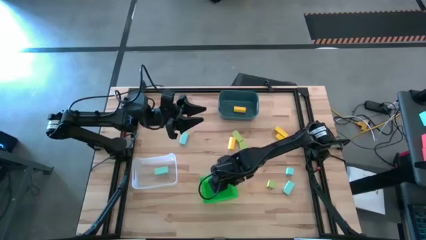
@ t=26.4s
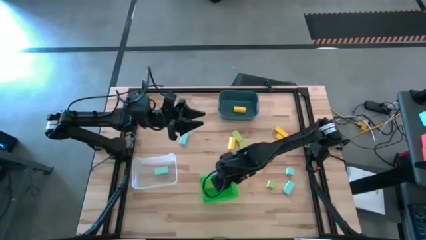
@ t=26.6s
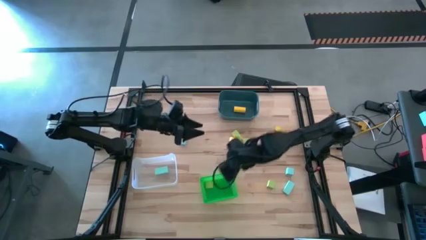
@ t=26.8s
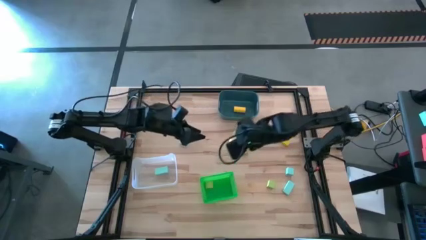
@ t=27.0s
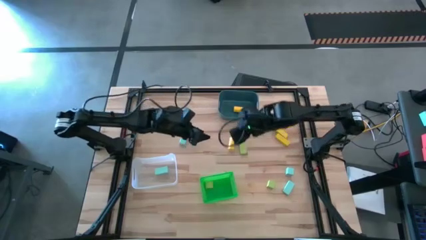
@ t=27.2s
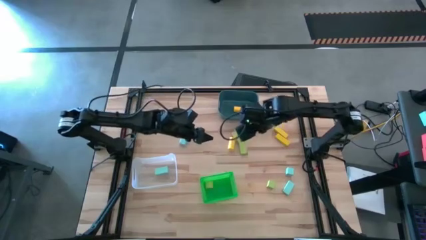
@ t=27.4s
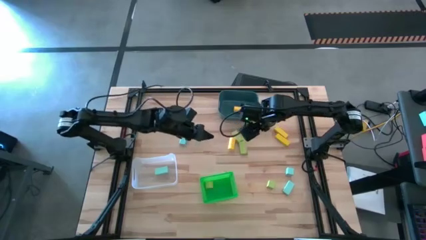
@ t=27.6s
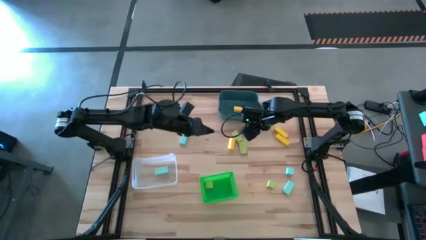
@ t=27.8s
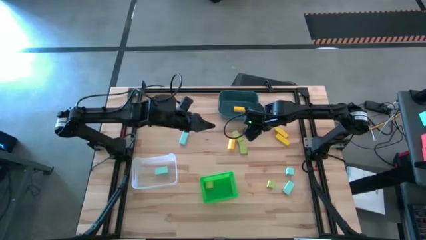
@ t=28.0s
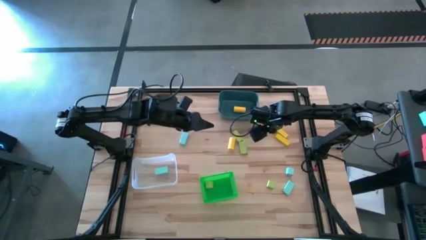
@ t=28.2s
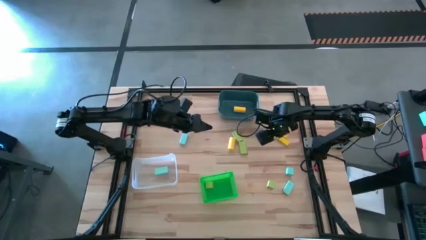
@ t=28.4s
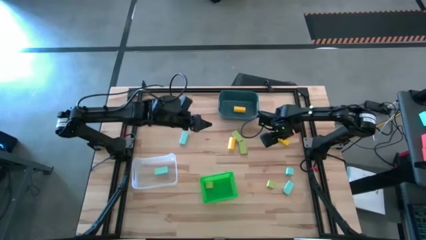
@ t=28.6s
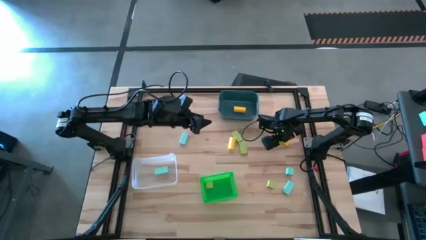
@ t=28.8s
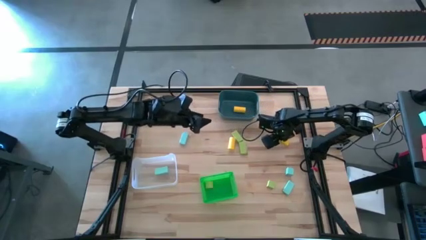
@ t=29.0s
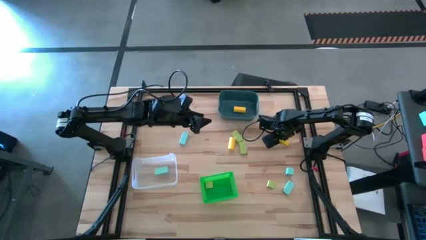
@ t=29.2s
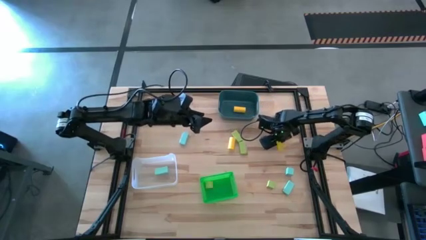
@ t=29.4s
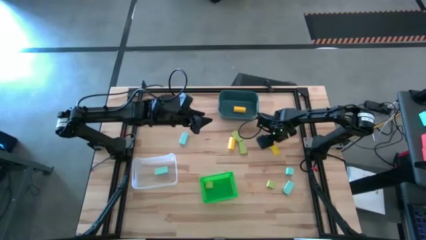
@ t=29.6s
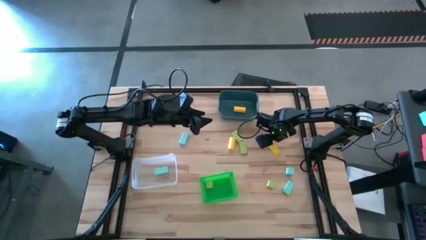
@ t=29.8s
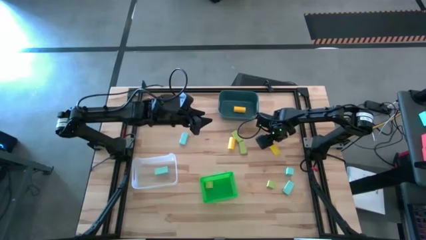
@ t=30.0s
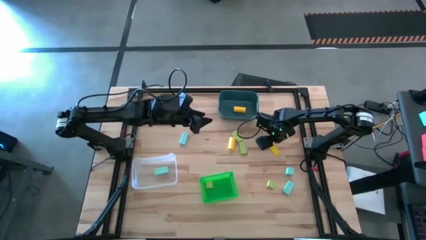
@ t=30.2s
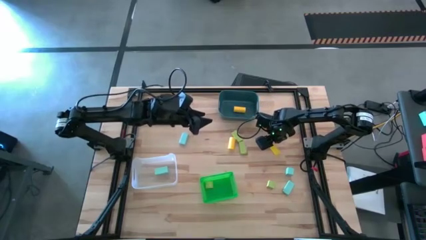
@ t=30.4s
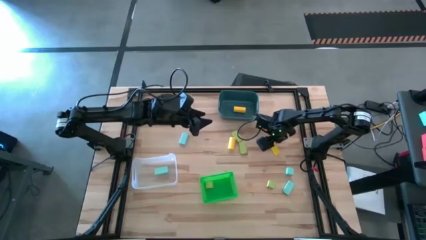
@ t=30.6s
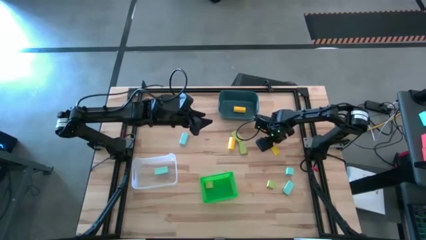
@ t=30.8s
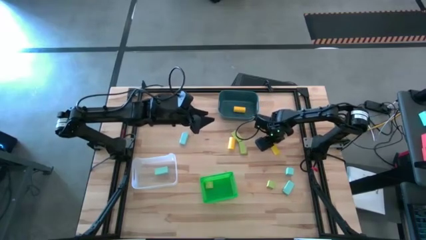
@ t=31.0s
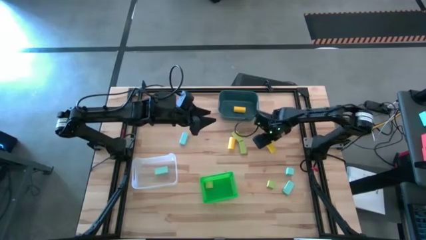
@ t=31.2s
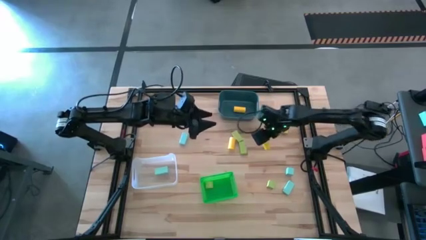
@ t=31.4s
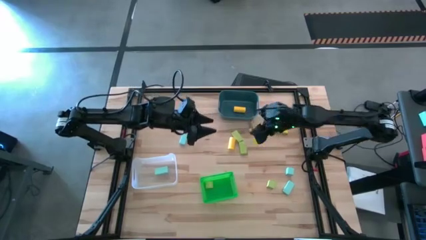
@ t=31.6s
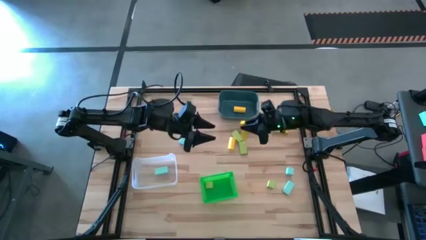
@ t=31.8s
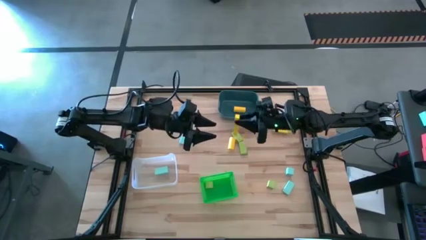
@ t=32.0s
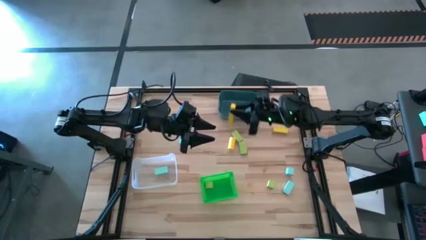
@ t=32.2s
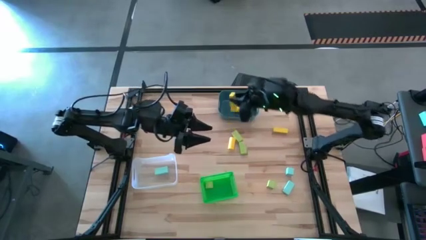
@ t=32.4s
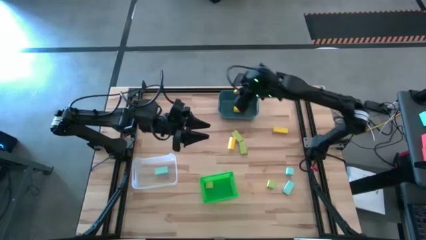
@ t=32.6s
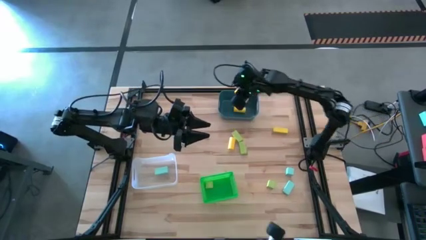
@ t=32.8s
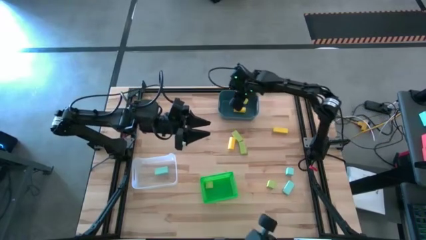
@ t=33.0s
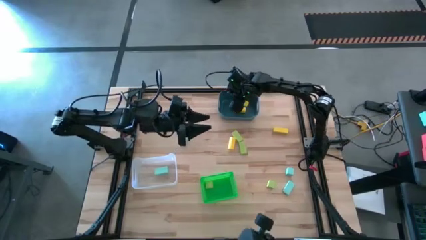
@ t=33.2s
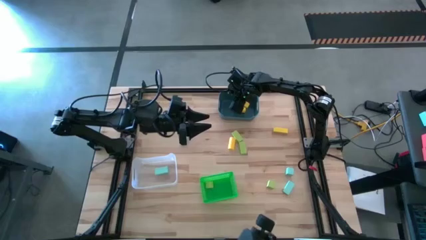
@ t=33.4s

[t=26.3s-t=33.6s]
Task: Sort & place blocks by color
Put the yellow block into the blue bin

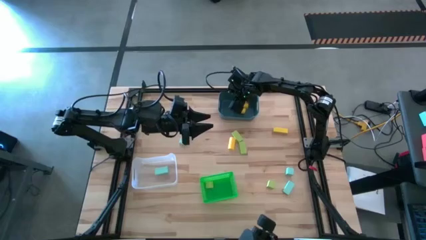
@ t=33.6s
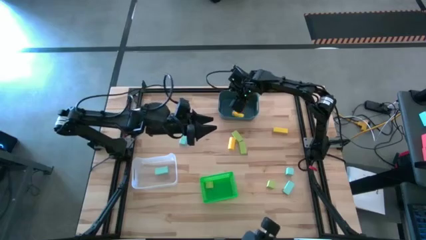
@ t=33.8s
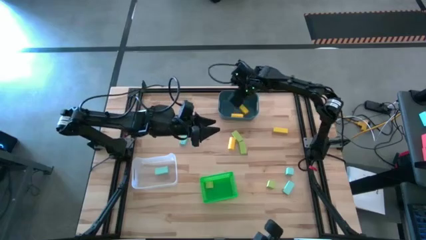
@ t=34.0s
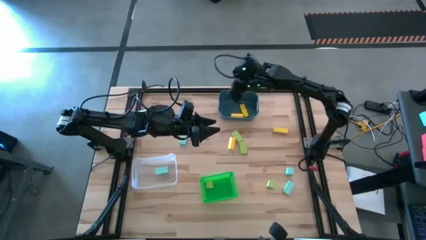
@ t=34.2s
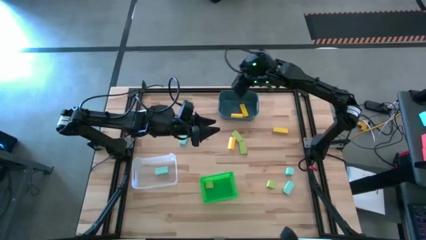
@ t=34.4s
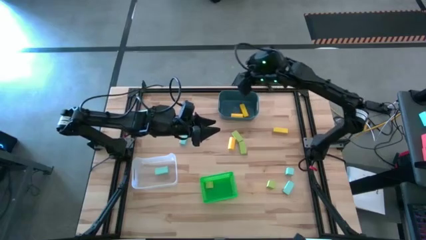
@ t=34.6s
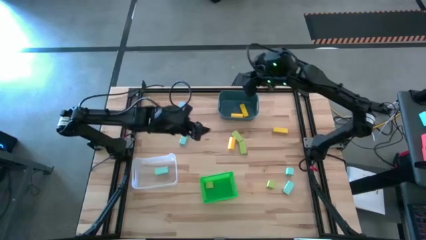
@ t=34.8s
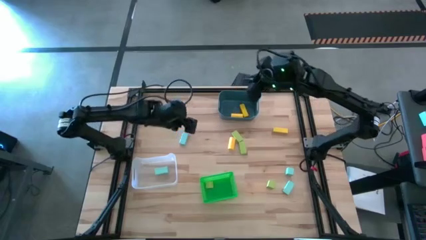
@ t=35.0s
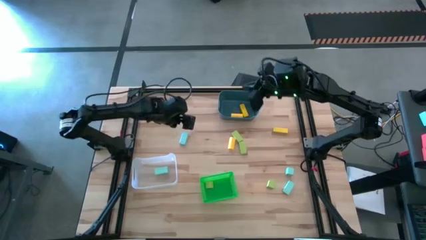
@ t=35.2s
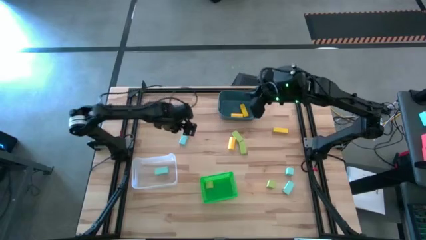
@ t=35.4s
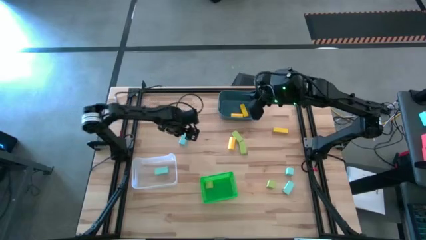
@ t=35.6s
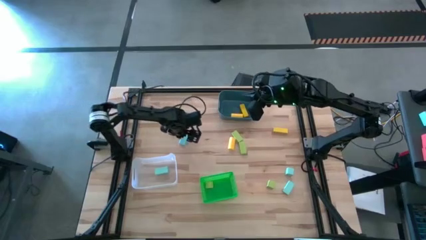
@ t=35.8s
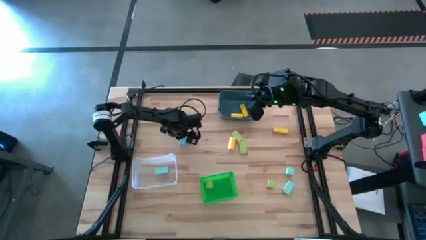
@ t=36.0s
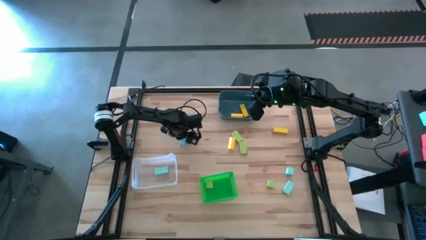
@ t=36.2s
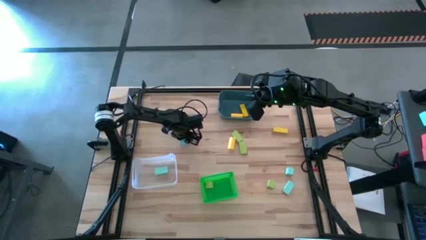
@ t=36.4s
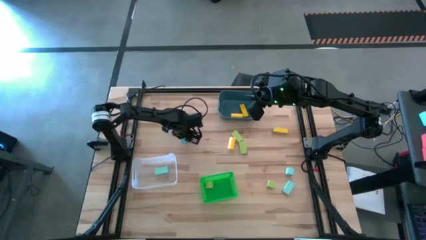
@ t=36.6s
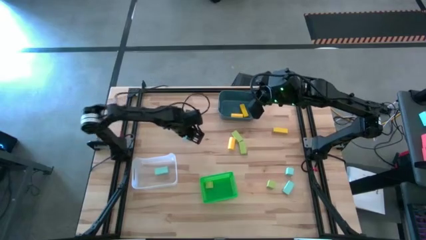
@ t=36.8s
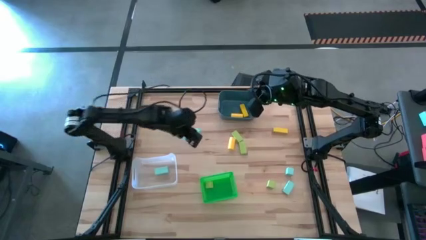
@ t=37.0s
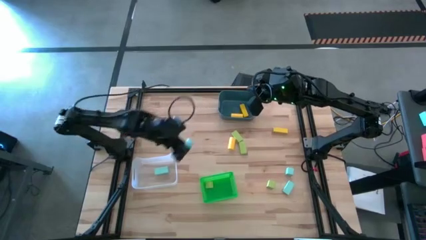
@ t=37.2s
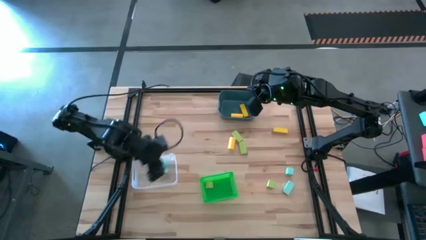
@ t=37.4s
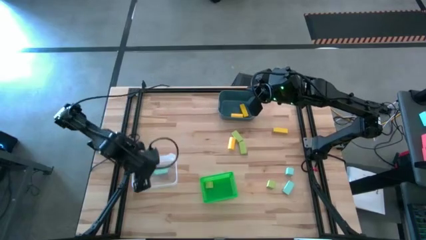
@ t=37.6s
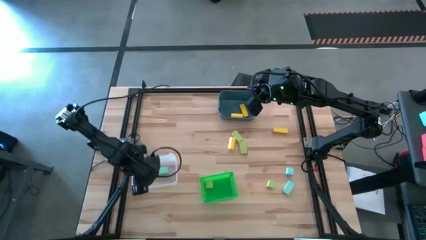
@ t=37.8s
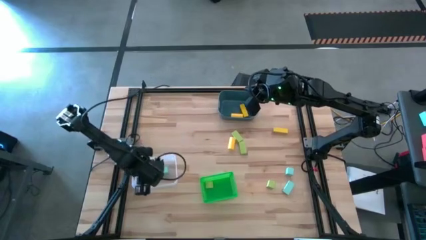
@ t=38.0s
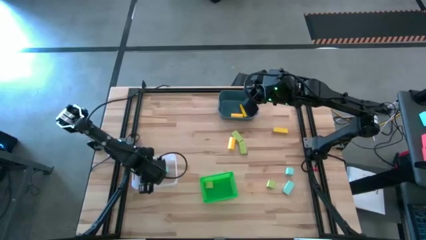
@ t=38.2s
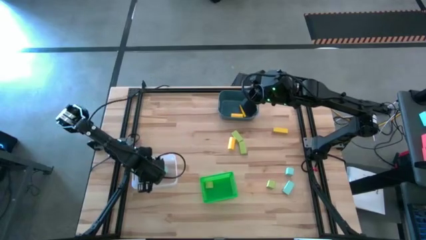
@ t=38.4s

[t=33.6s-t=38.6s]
Put the top left blue block into the transparent bin

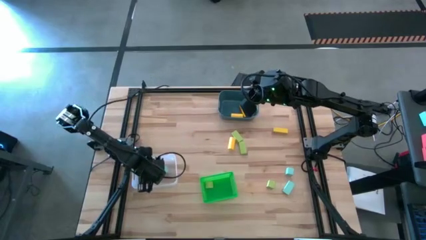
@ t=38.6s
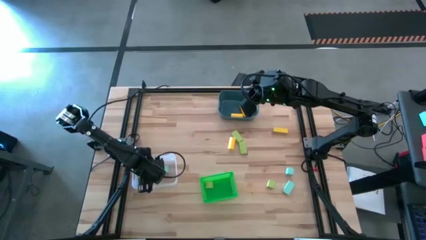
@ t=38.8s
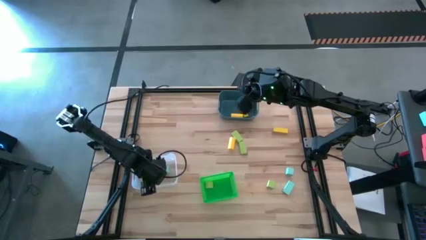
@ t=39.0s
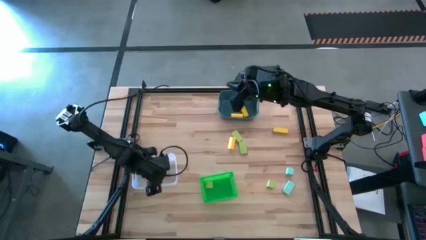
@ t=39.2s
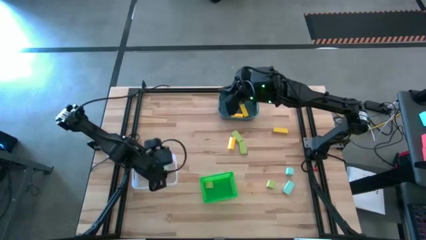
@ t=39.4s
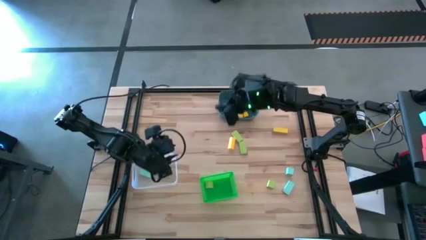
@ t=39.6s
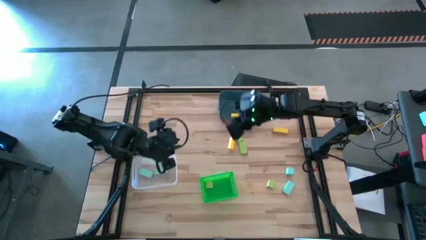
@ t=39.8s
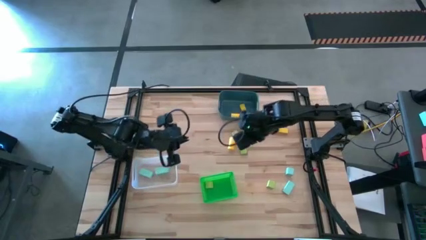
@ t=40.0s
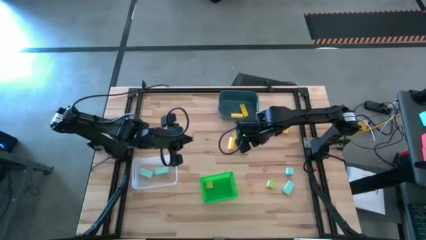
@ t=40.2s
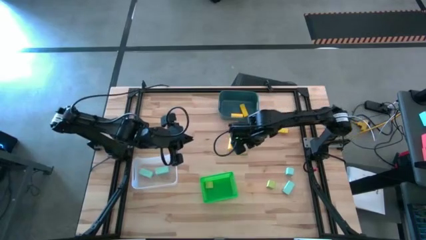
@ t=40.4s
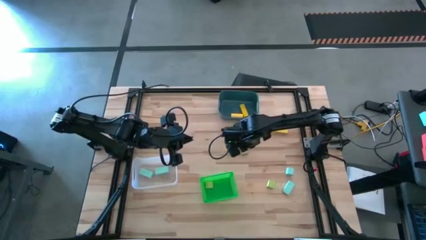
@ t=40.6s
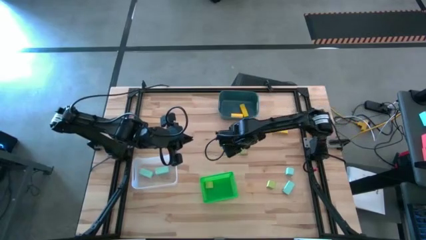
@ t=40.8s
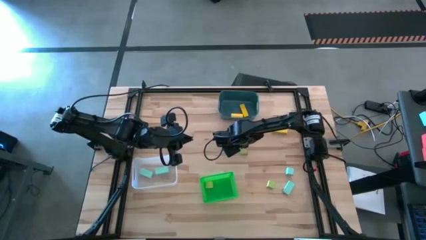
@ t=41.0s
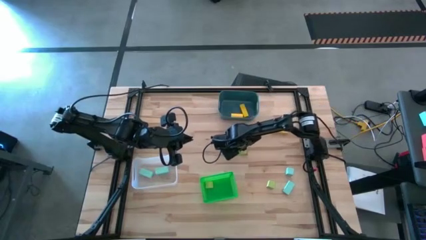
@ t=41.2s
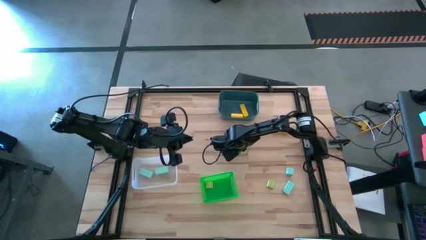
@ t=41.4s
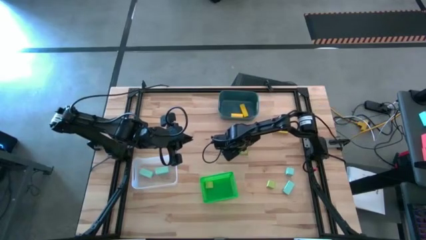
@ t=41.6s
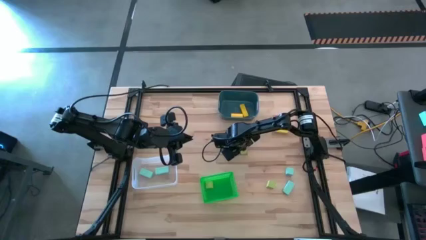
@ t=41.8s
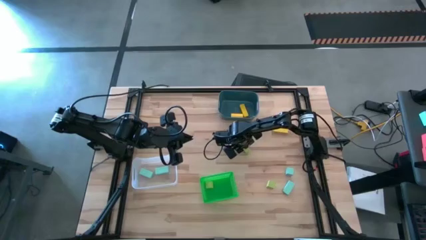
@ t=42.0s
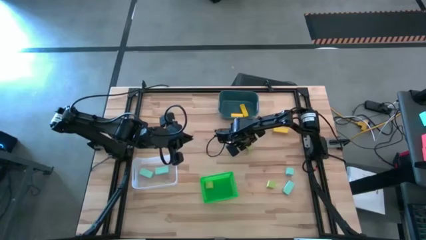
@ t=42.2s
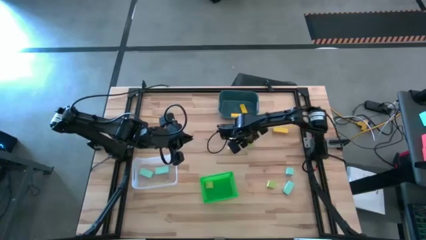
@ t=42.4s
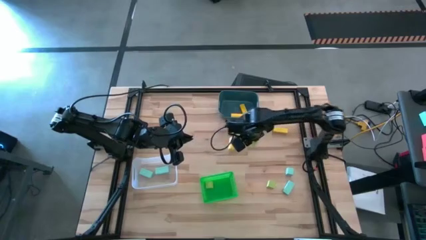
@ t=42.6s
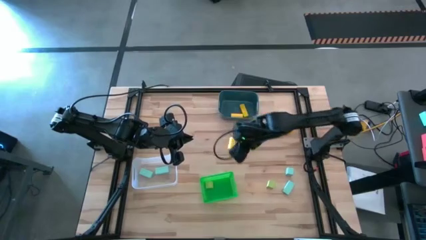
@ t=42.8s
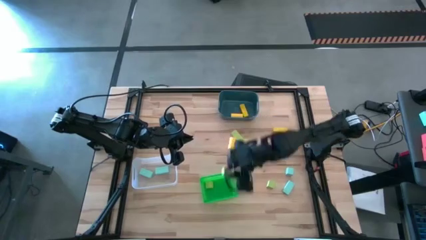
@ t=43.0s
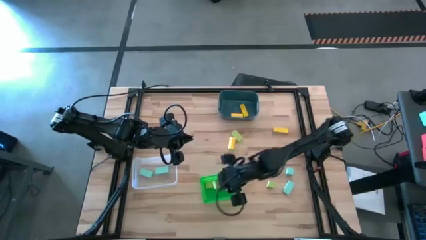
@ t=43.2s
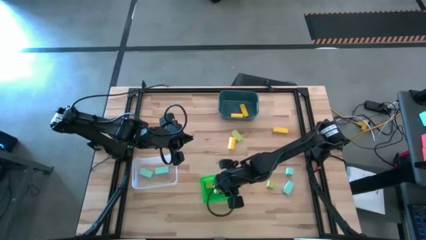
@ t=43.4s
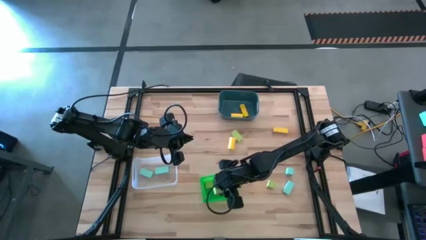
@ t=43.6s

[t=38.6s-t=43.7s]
Put the green block into the green bin
